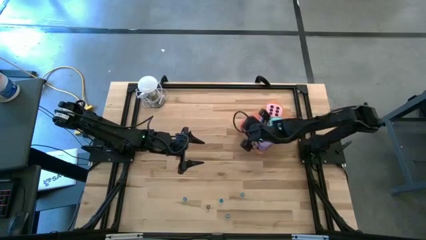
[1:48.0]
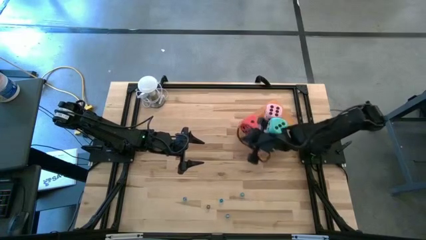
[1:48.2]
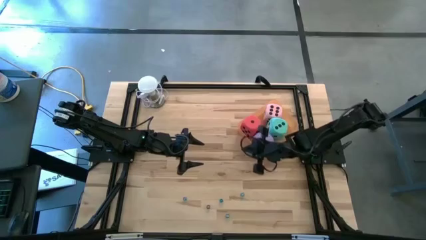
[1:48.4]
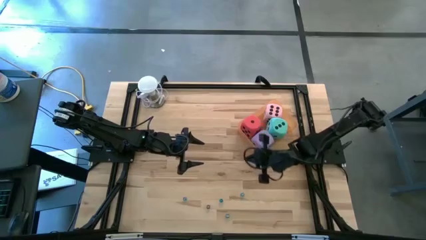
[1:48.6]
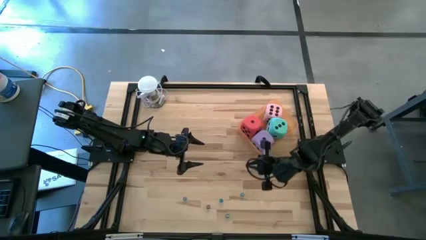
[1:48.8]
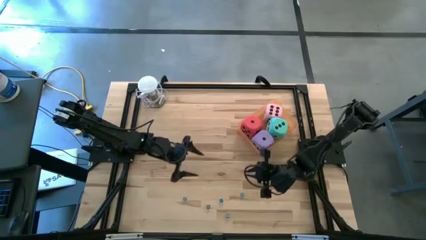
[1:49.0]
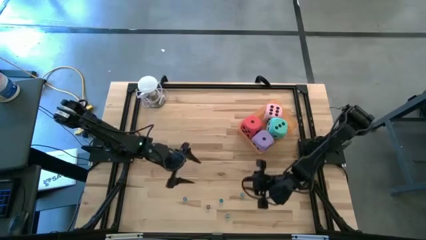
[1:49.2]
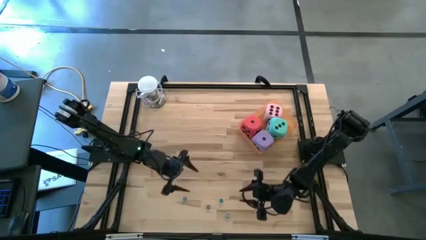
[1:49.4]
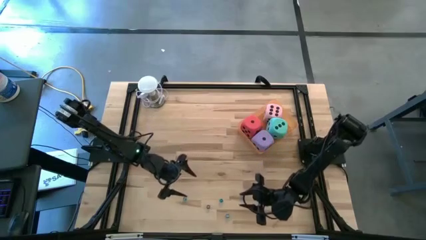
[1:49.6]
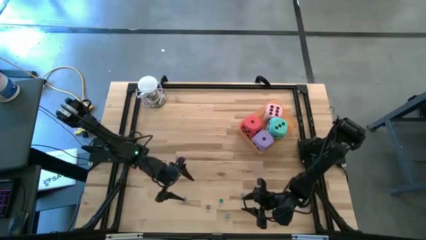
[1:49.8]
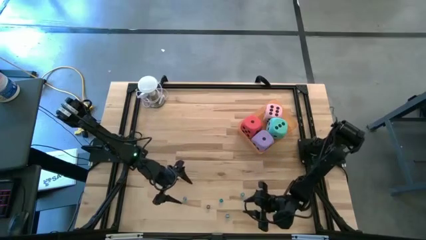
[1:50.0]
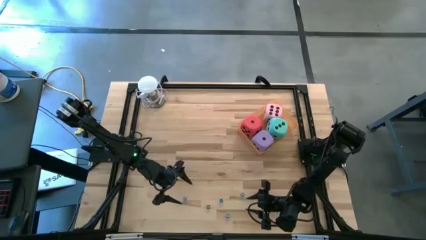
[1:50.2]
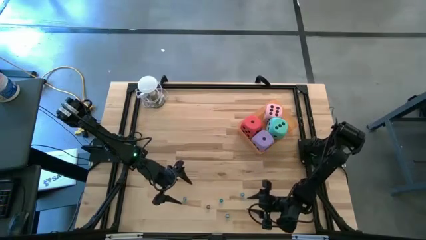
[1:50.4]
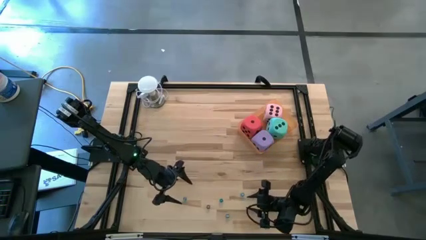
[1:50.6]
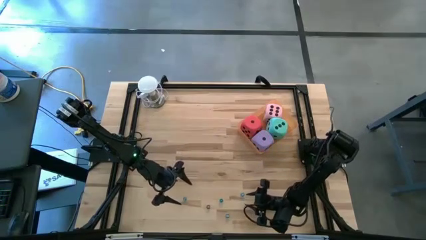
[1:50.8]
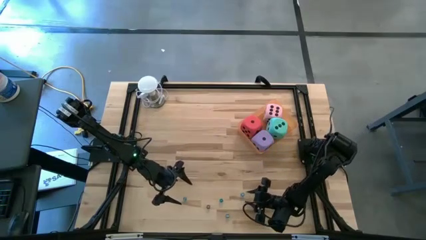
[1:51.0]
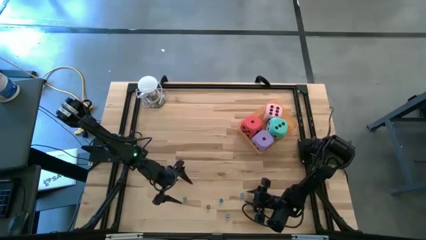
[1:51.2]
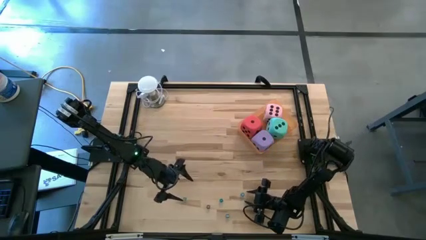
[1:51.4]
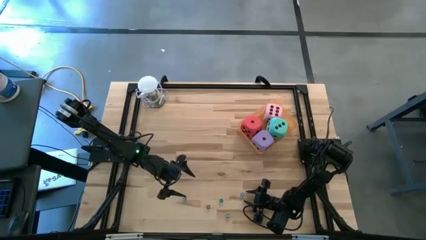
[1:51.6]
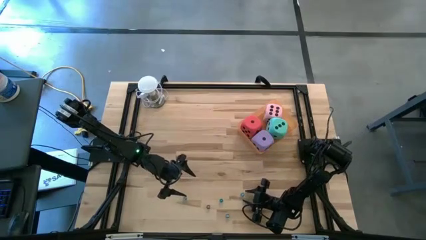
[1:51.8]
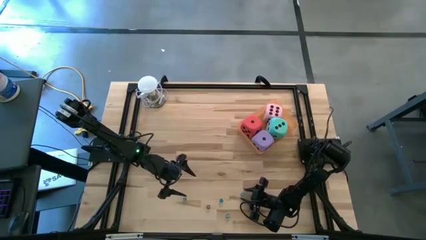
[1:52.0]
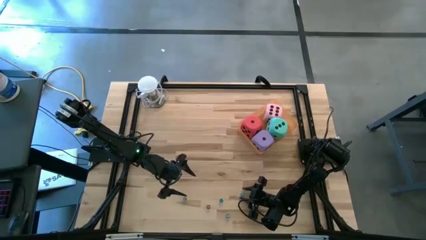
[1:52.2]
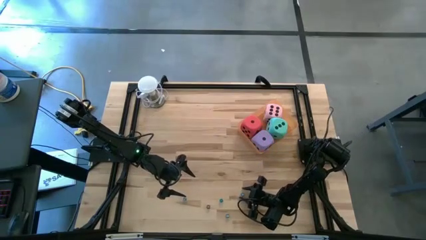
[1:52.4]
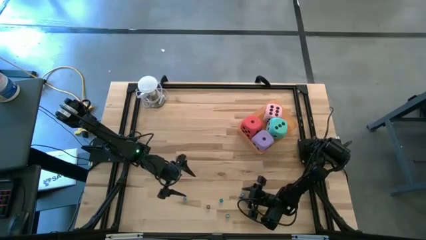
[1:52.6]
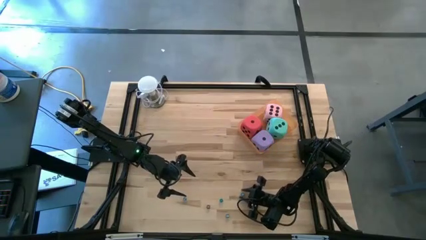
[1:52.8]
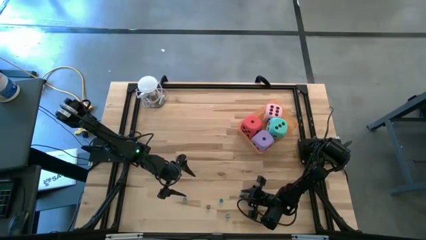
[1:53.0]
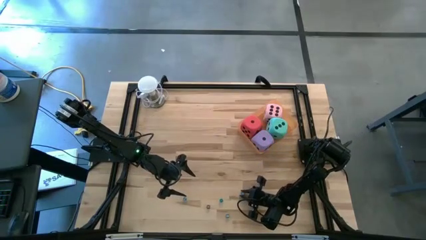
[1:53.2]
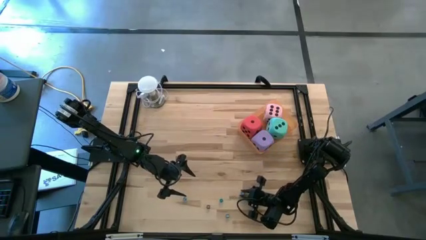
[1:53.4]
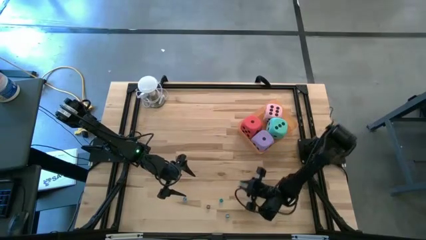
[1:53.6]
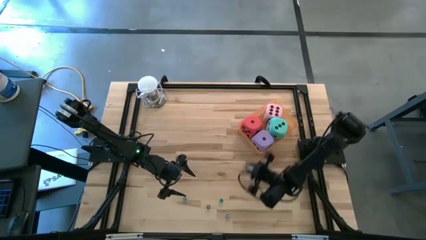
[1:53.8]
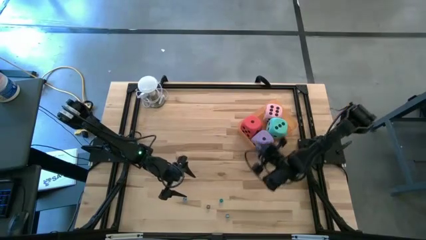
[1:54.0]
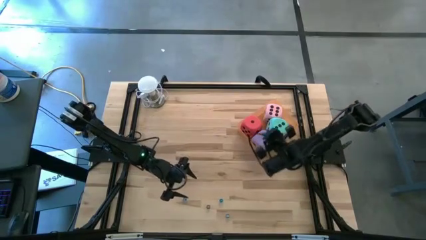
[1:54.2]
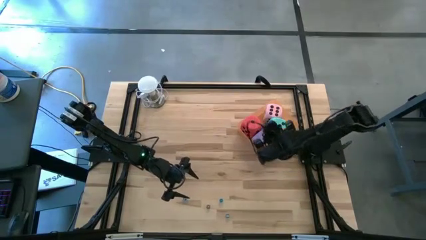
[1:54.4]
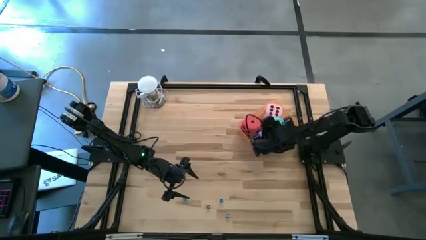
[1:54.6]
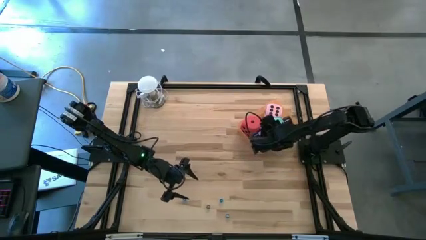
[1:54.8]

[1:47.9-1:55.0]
Task: Pick & Place Dice
Put the small blue dice into the orange bin

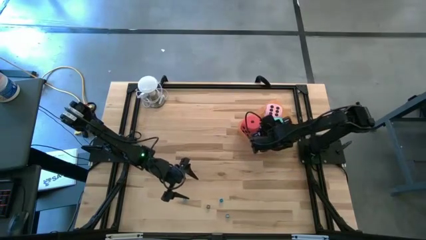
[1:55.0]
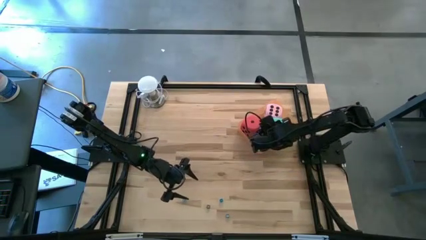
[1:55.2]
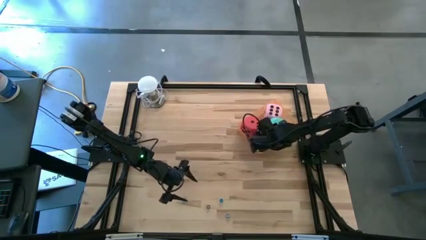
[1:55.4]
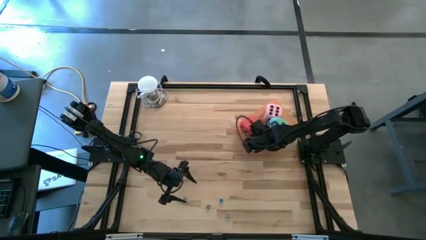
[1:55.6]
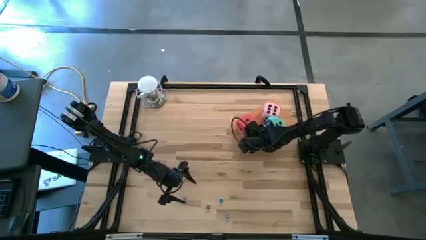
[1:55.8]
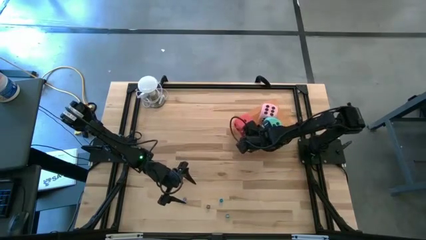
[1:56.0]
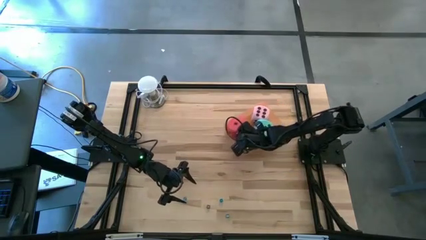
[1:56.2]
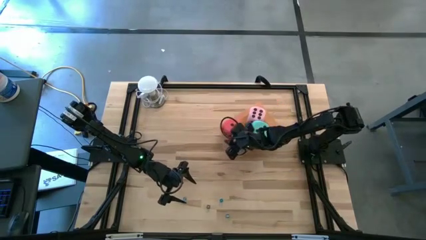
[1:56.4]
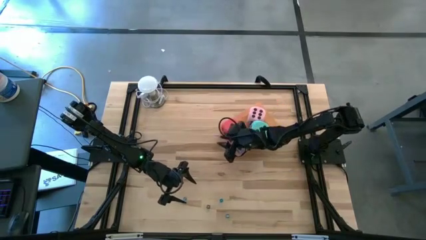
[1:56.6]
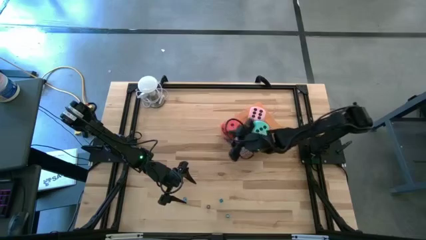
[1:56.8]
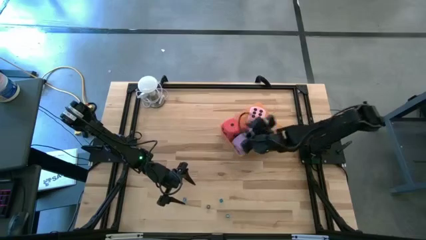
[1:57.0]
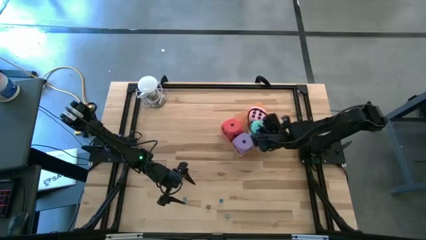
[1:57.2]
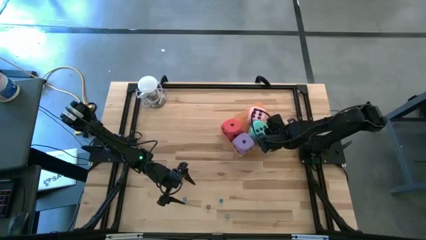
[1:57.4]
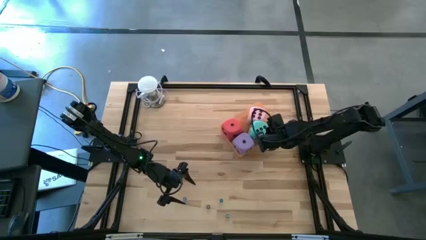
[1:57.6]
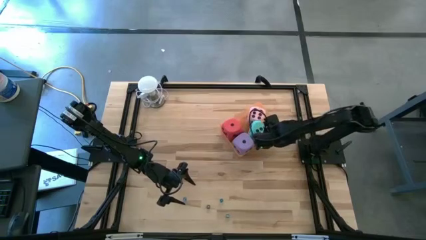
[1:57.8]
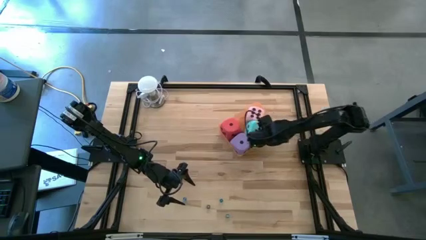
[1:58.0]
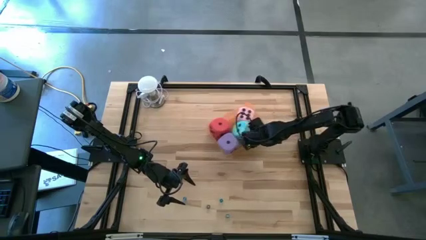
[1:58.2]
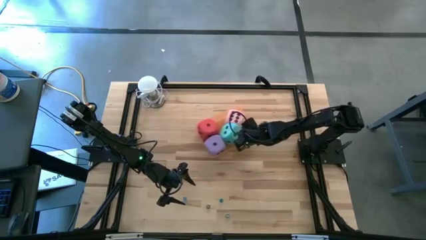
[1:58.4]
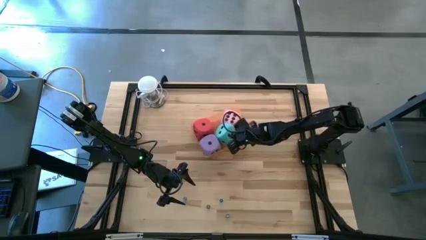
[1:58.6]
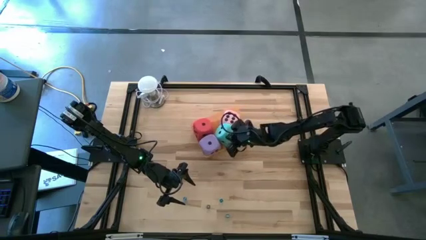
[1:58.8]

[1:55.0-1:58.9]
Adjust the large dice in the orange bin

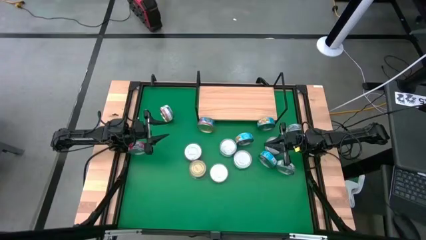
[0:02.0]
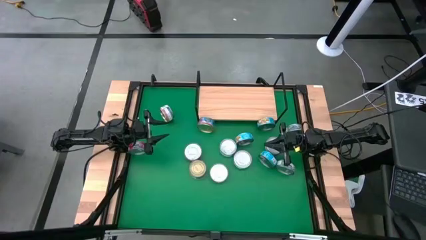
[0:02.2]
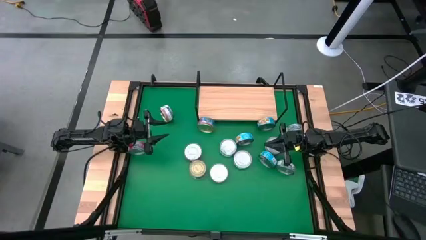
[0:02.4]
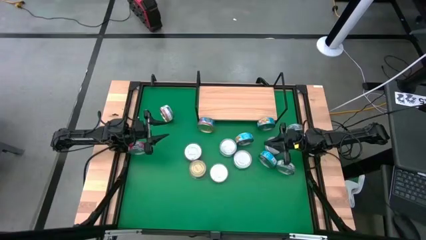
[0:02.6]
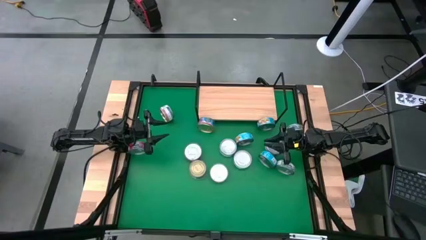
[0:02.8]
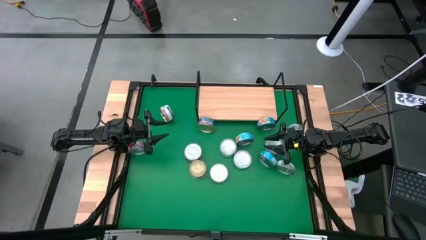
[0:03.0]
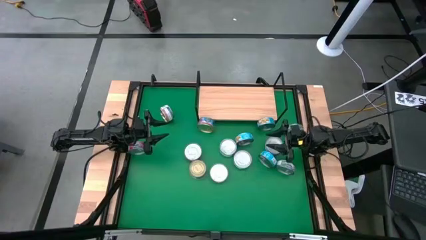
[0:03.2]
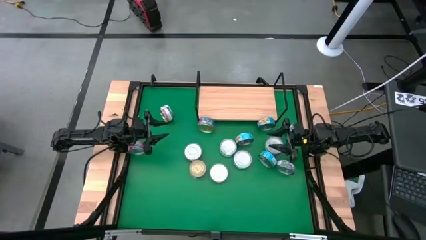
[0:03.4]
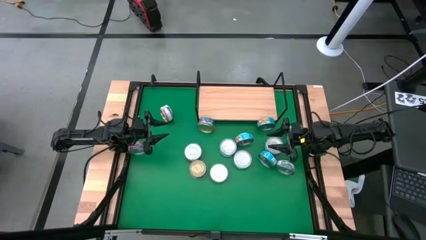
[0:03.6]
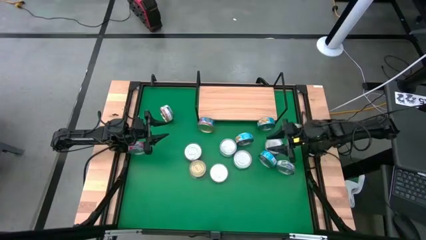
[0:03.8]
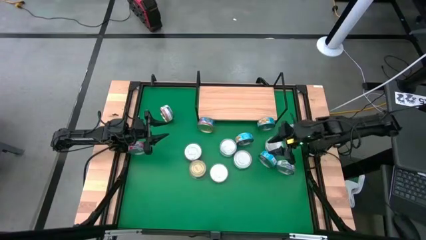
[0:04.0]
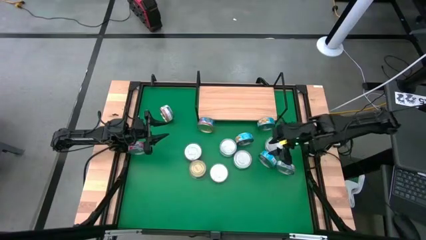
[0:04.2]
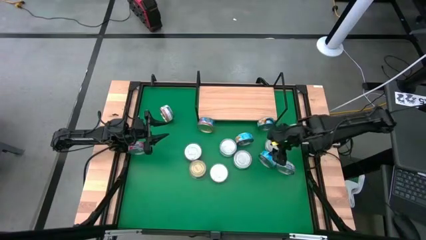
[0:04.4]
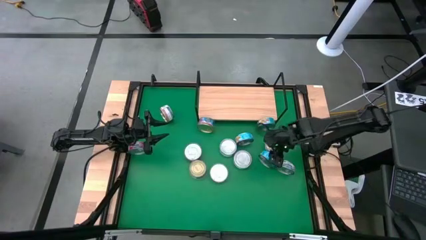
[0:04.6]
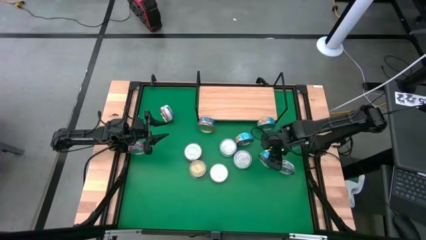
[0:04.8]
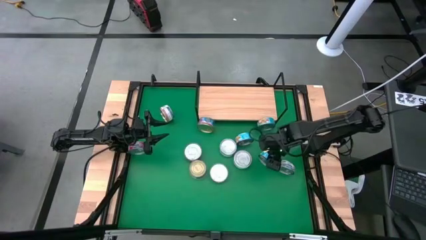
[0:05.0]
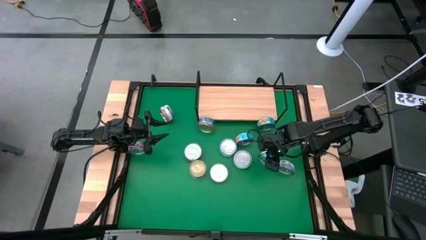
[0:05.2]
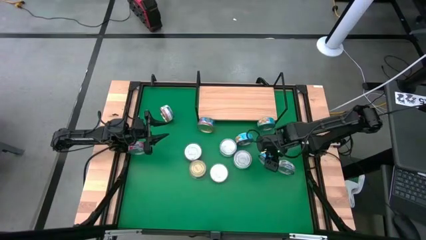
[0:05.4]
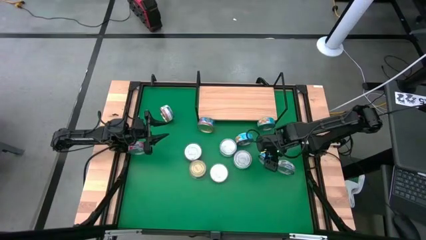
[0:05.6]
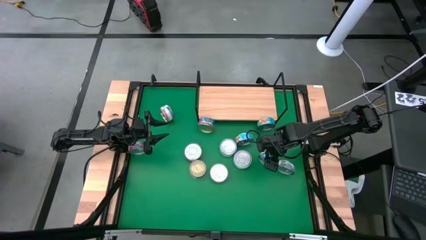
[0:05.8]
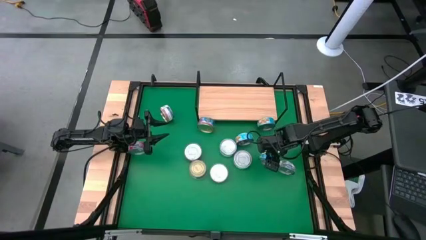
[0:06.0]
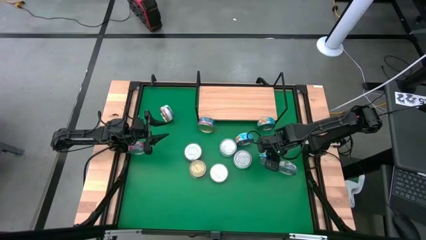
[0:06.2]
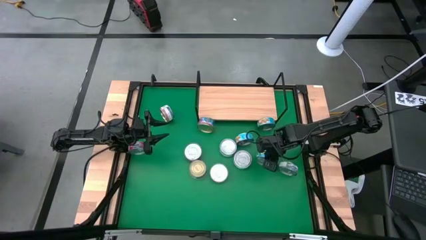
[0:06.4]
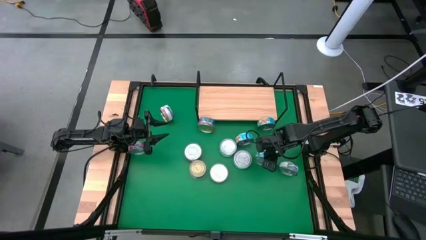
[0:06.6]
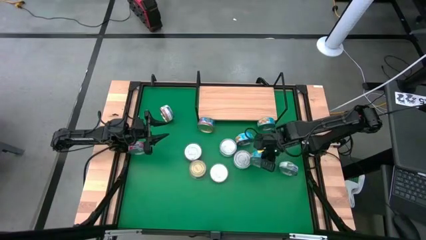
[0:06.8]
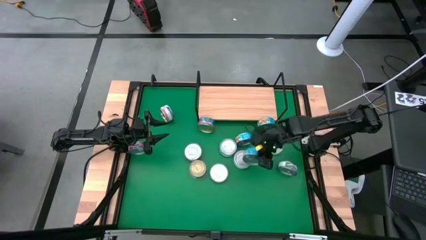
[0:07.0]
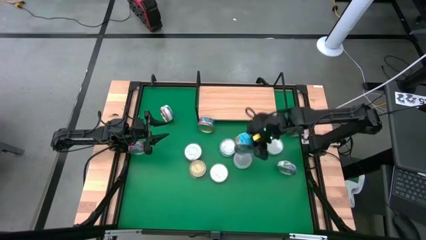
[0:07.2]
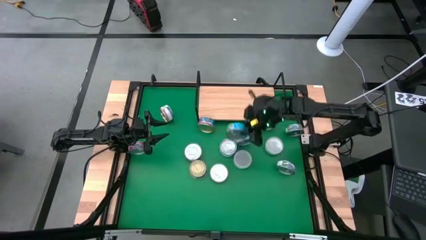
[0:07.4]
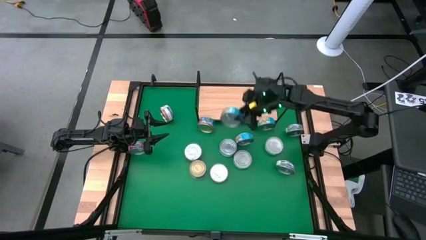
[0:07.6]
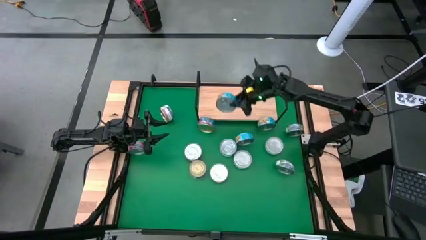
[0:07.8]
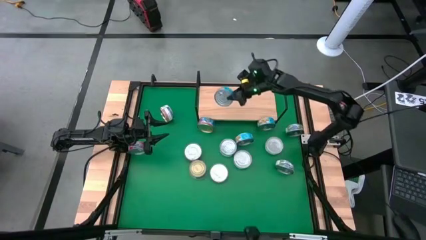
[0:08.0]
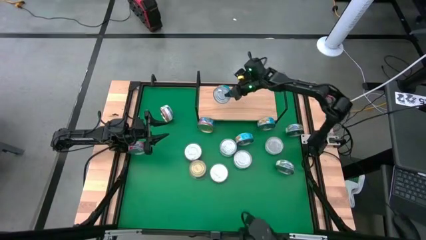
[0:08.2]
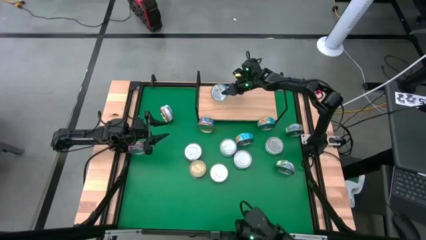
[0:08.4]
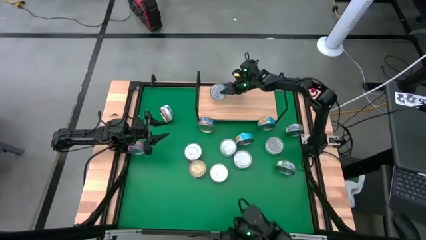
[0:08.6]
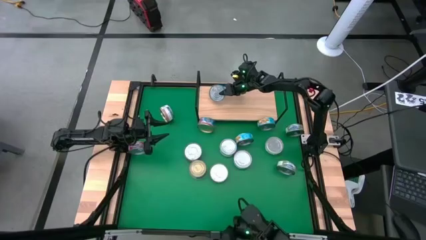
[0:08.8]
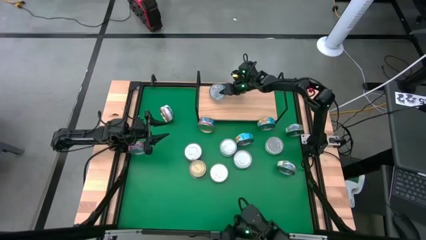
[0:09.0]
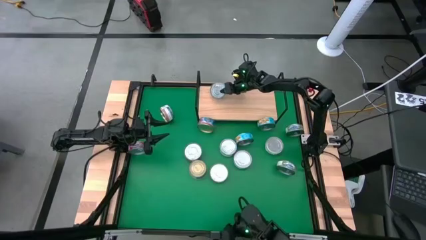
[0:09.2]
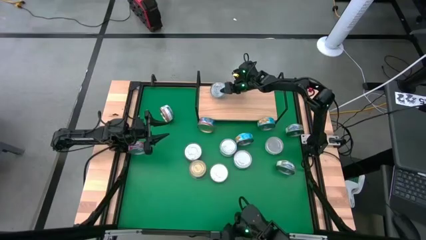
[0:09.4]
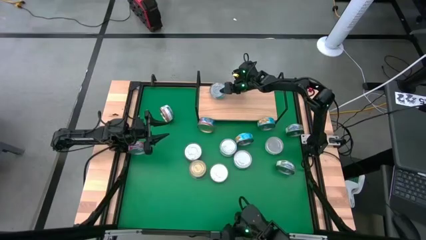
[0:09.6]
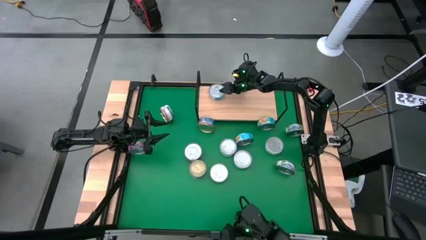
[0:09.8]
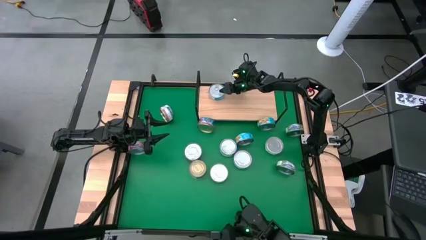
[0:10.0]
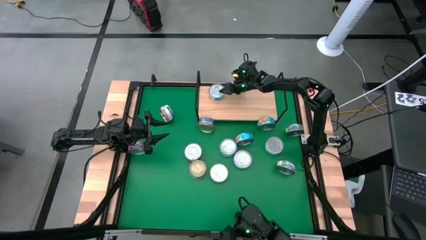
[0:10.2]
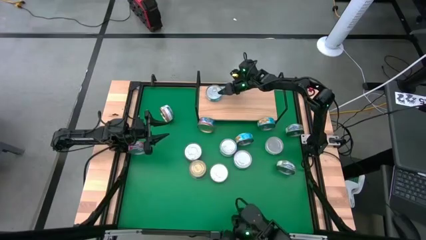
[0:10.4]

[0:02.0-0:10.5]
Task: Stack canned seafood by type on shelf
Put the yellow blue tuna can on the shelf
